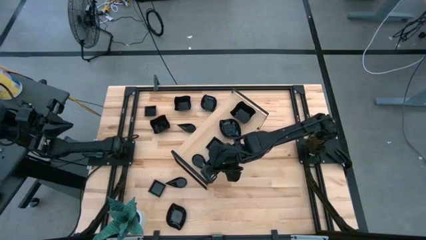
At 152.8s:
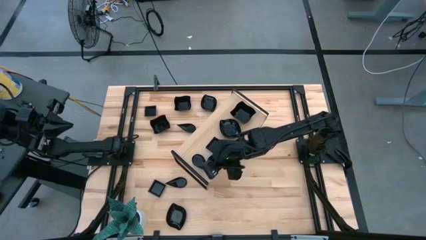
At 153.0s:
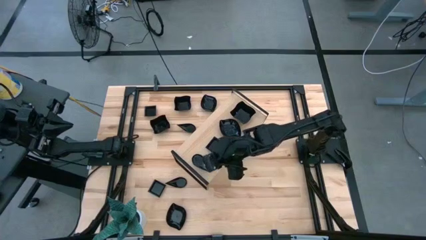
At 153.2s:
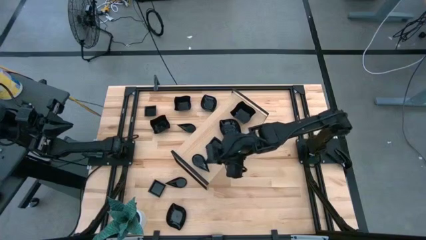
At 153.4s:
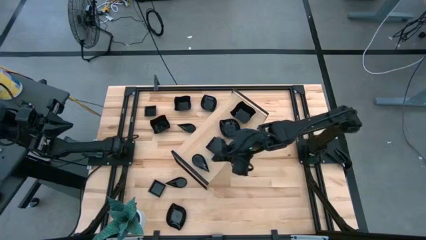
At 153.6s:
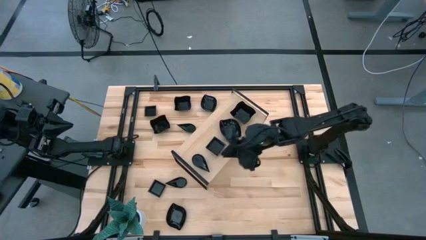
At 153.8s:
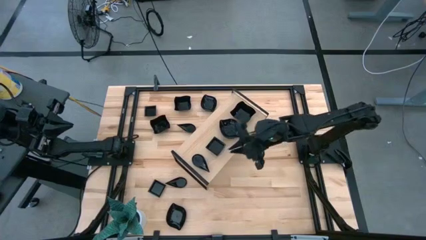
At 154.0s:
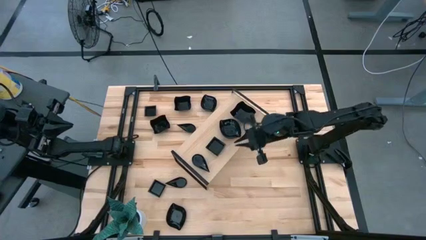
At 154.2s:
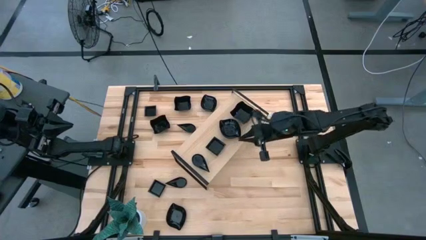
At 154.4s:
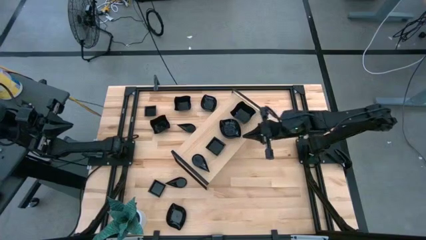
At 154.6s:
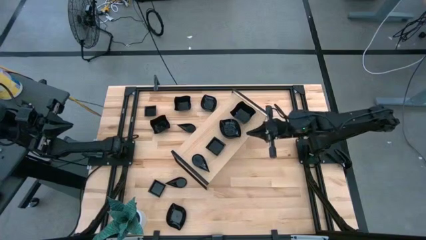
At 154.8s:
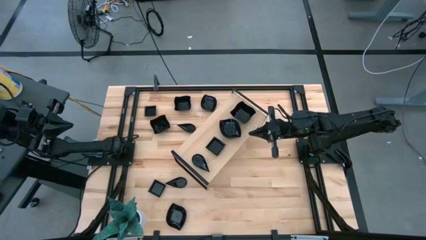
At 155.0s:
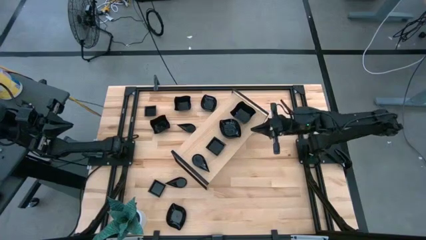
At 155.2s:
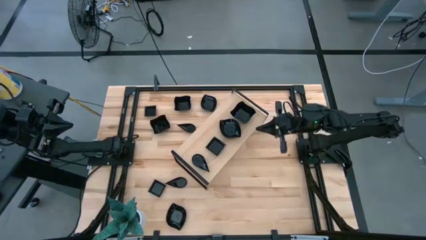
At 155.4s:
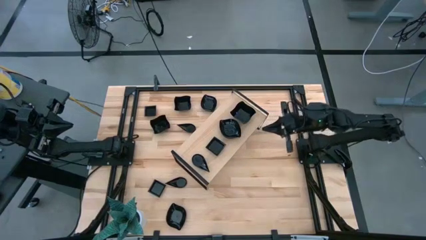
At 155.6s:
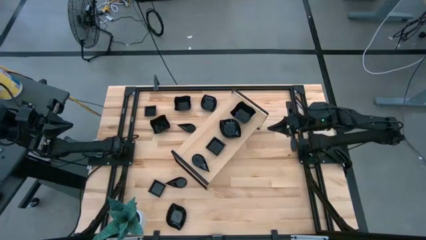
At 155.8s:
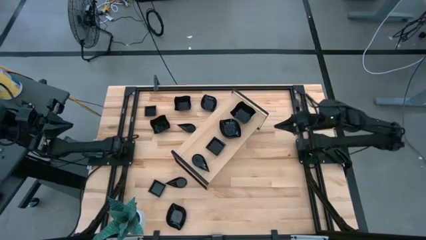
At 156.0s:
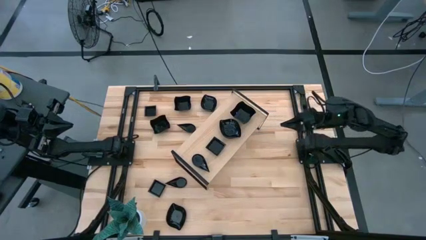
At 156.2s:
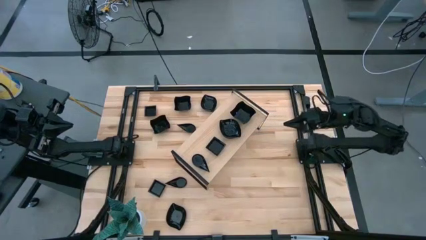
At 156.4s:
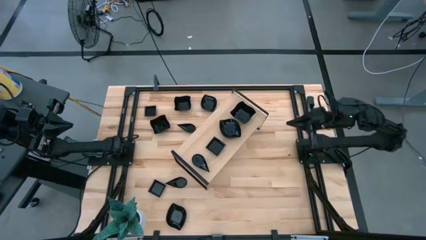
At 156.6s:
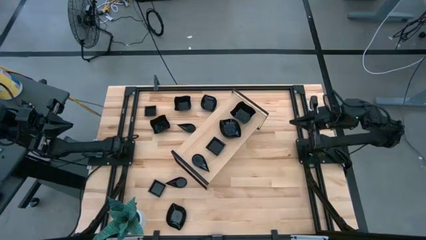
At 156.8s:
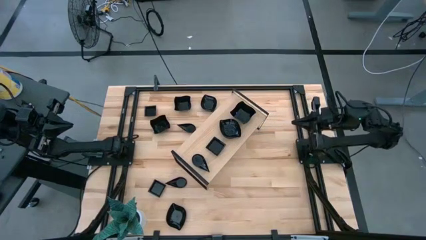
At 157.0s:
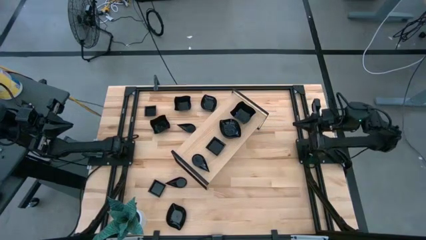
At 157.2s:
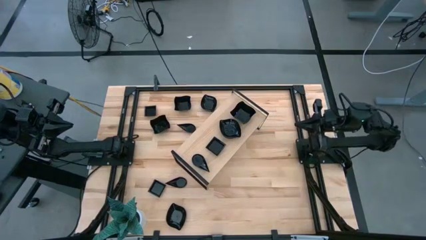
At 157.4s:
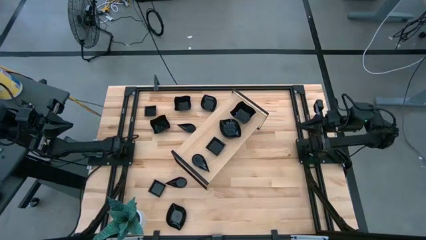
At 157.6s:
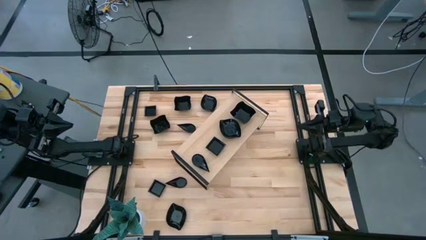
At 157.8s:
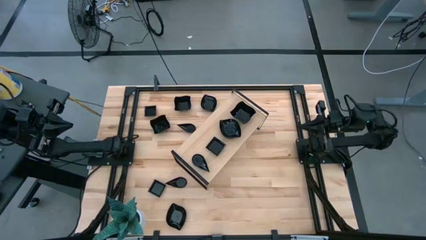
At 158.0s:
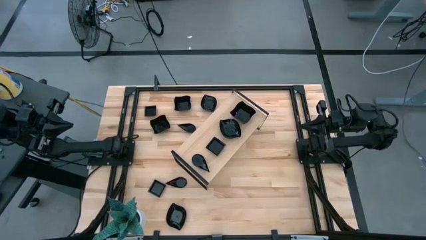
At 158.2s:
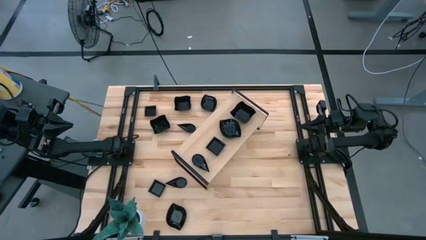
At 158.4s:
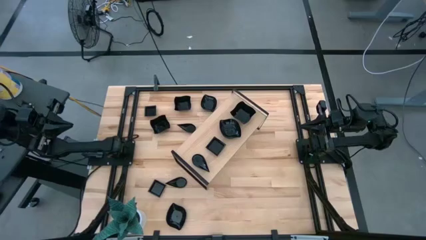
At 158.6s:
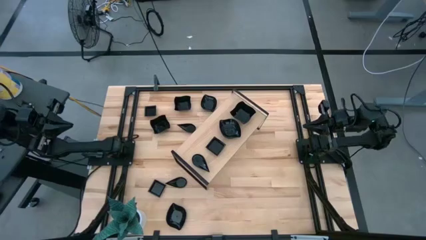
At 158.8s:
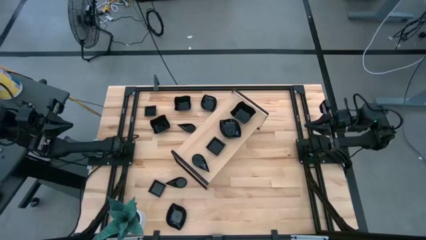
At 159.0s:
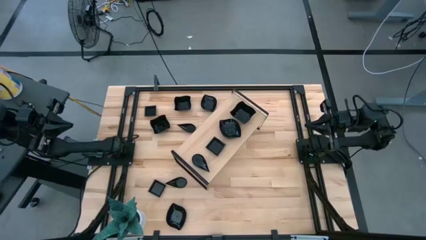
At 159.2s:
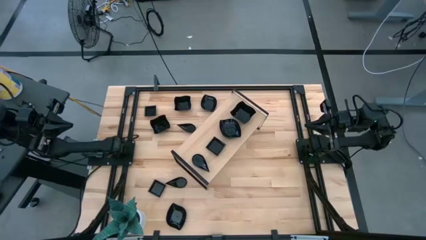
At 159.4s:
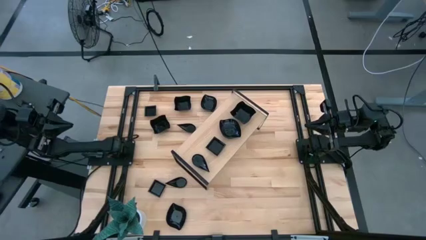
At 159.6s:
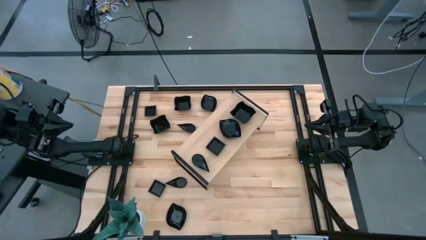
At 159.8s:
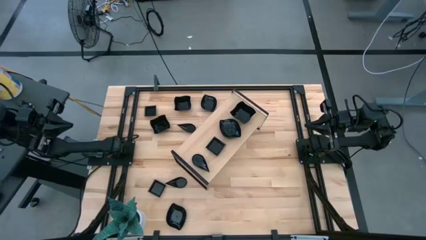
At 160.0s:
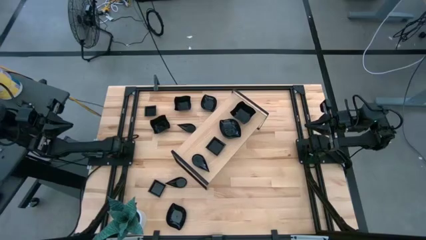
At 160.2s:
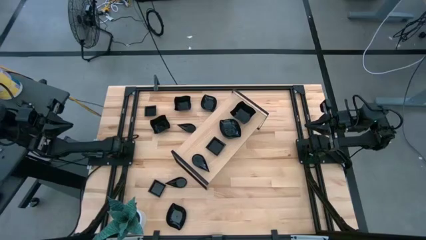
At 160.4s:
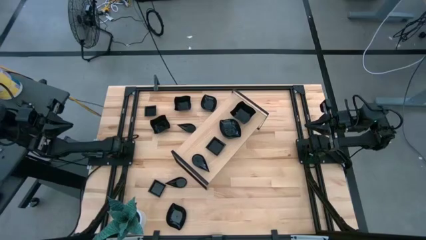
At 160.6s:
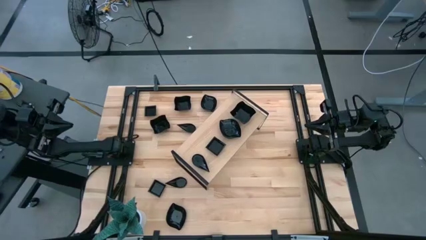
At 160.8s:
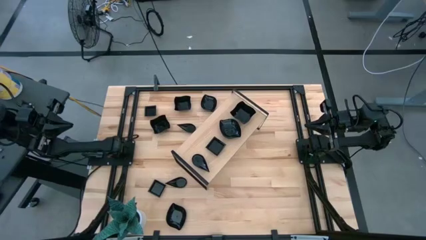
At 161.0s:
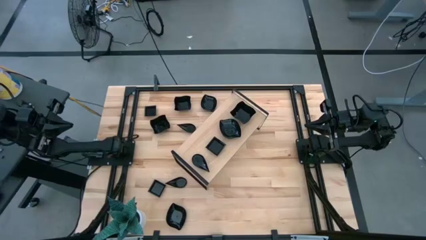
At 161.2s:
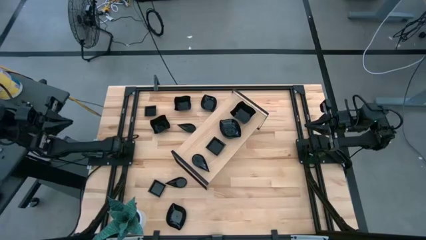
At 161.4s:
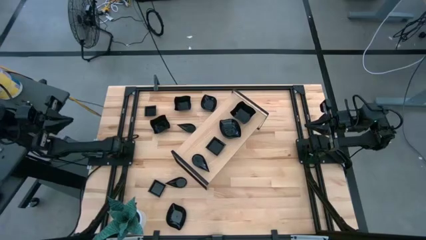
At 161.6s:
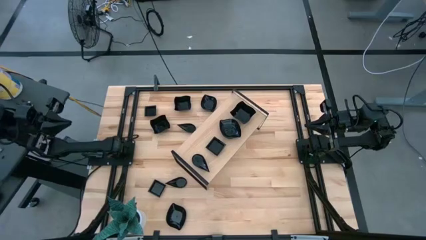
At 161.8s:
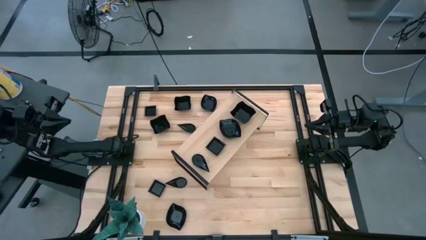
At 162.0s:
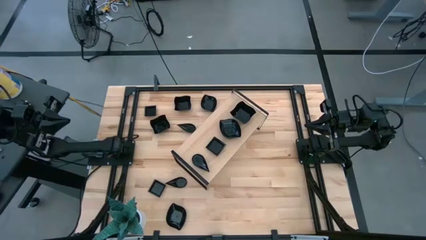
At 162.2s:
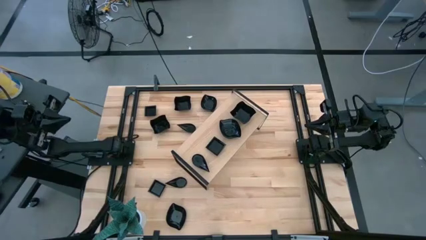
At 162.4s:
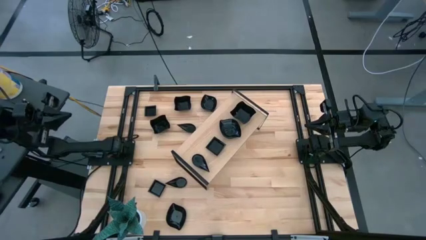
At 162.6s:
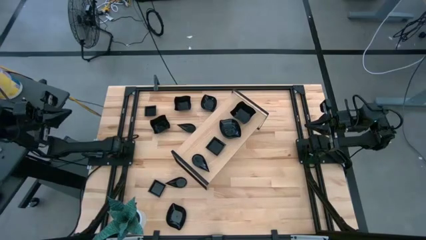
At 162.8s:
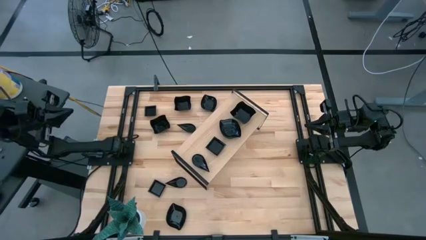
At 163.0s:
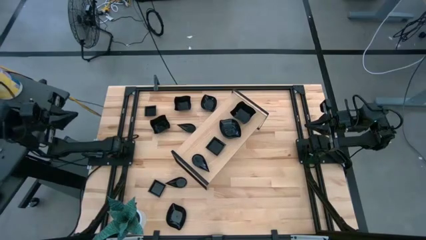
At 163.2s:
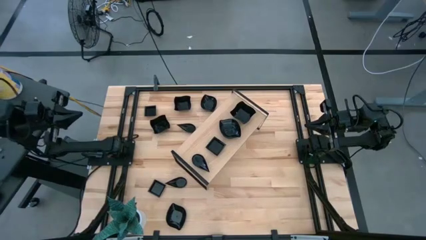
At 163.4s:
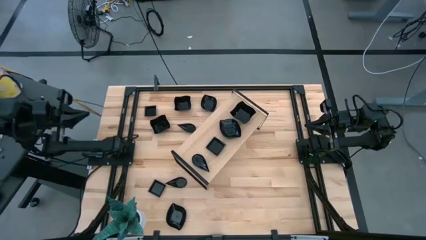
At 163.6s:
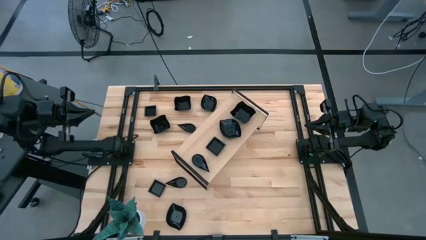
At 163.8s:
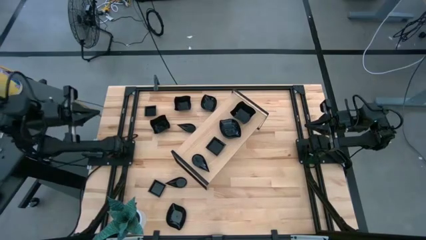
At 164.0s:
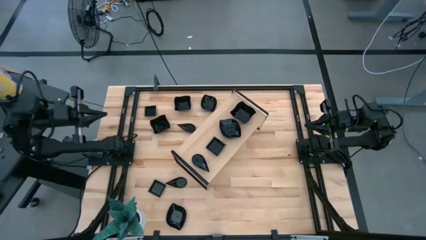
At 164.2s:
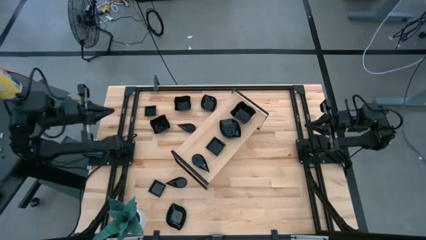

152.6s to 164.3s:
Task: Pick & Place Mini shaped plates
Stack the black wave square shaped bowl on top of the black wave square shaped bowl on the shelf

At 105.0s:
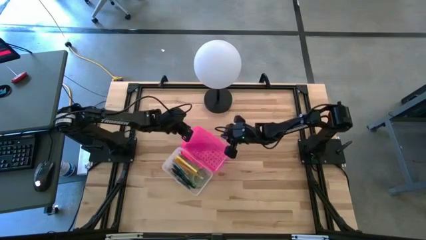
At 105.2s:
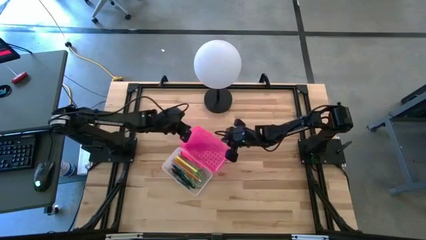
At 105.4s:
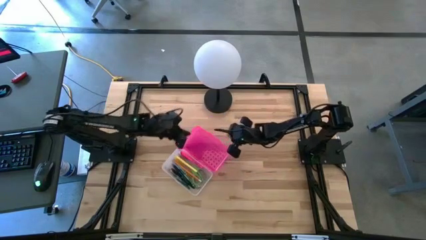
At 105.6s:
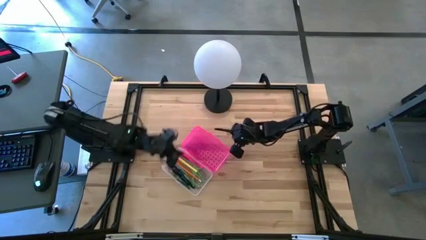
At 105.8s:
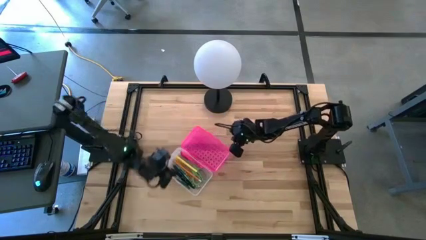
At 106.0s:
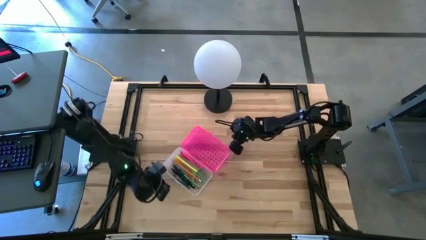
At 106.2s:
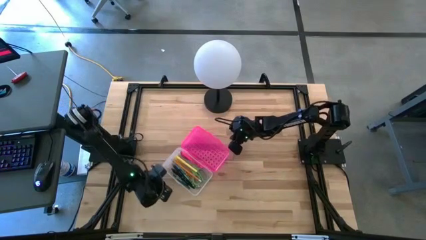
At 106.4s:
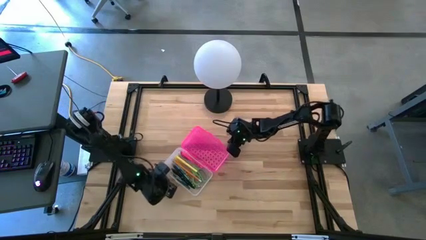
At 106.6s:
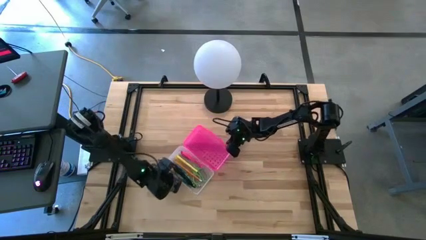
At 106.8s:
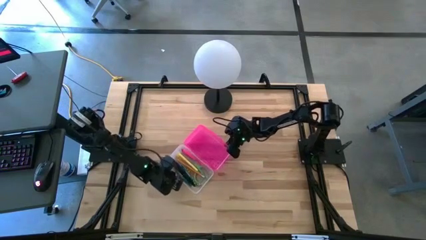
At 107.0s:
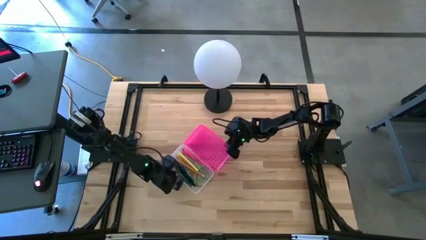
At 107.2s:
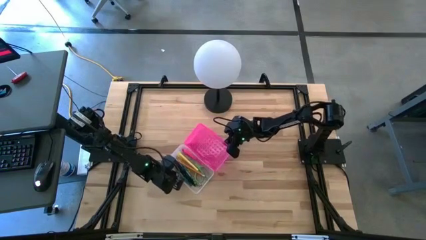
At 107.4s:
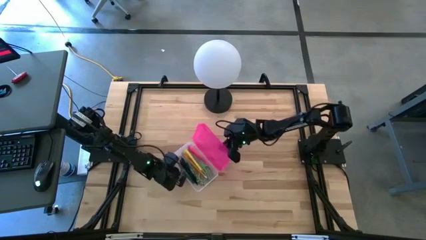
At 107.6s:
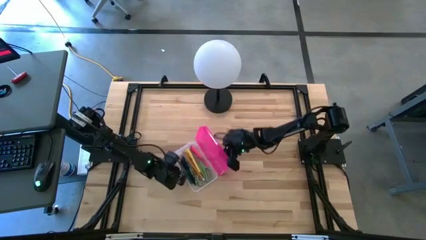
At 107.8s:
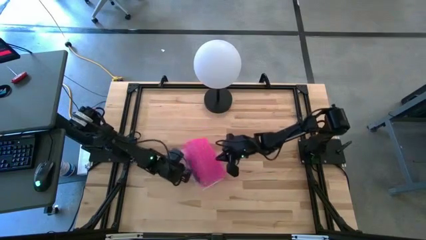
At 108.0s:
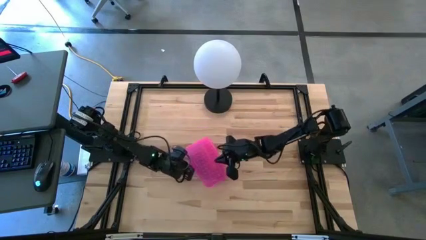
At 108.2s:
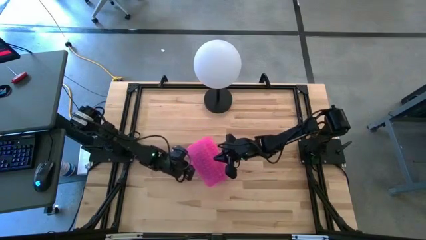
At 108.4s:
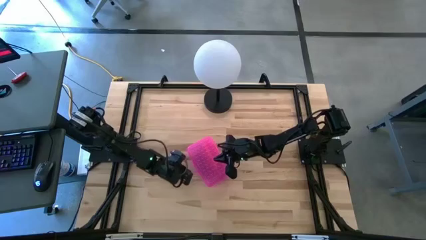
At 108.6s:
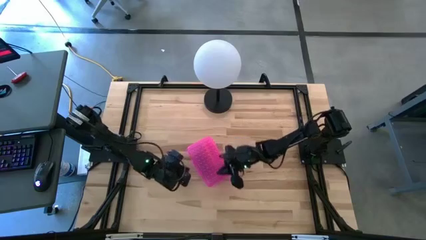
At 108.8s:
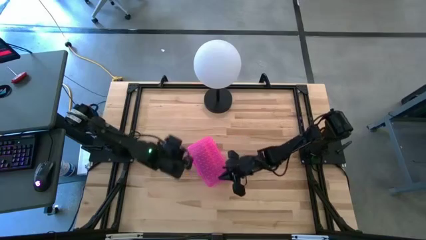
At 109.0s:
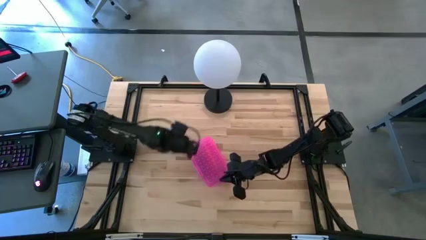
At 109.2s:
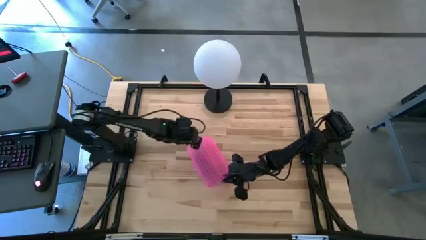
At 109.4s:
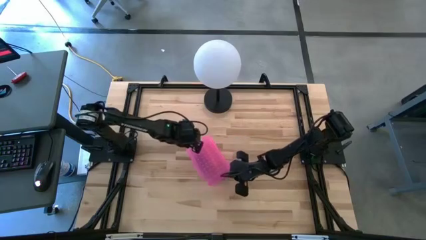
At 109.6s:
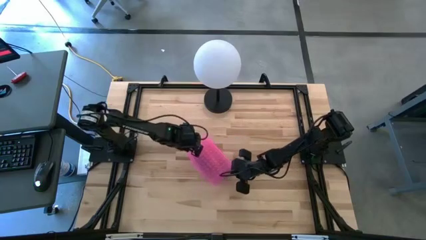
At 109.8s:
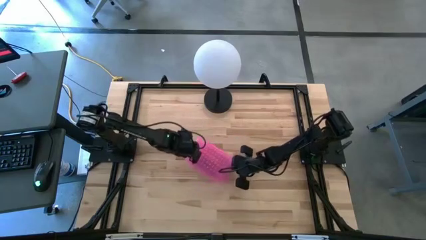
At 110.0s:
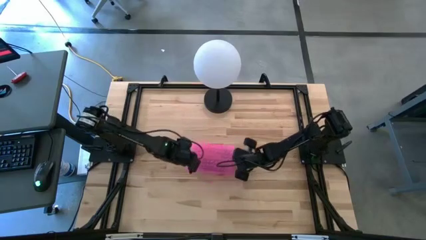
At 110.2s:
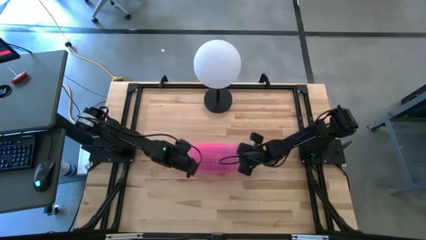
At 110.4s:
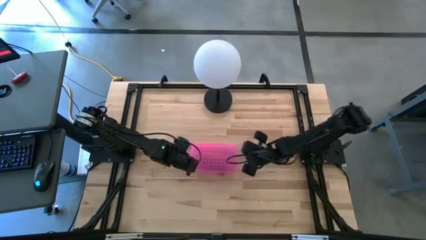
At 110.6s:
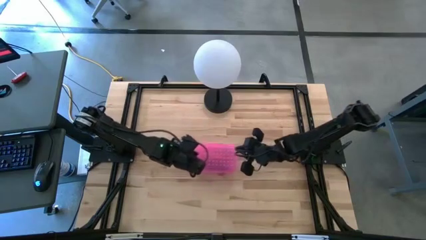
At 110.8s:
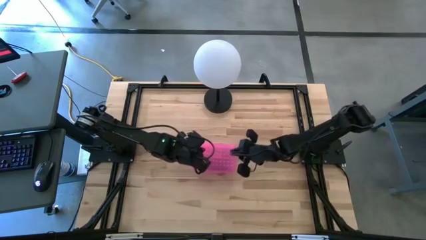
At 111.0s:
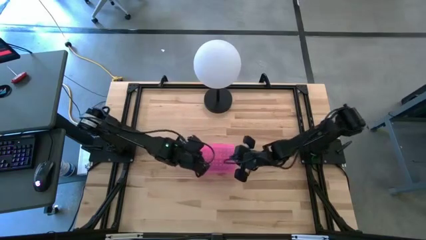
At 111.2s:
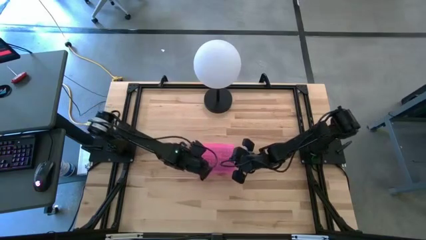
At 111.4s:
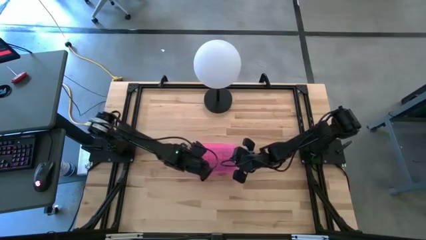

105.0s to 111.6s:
Task: Pick & place school supplies into a supply box
Close the pink supply box
